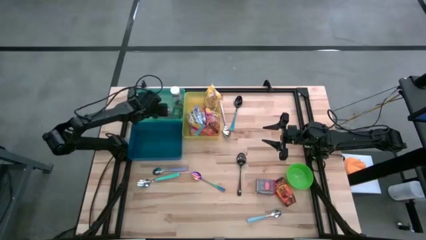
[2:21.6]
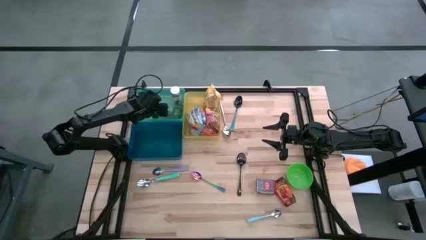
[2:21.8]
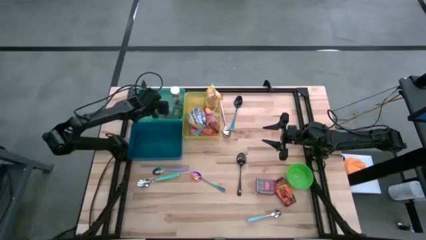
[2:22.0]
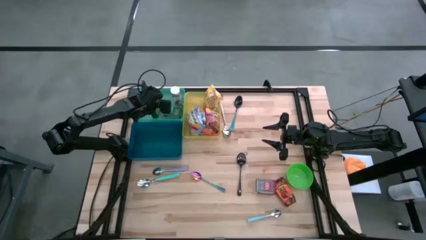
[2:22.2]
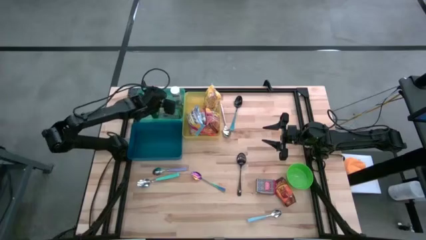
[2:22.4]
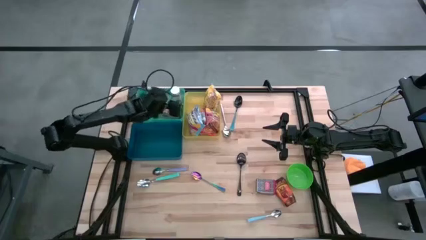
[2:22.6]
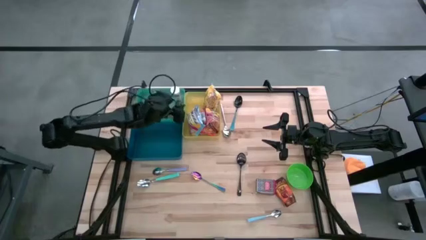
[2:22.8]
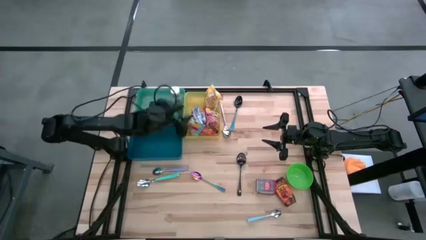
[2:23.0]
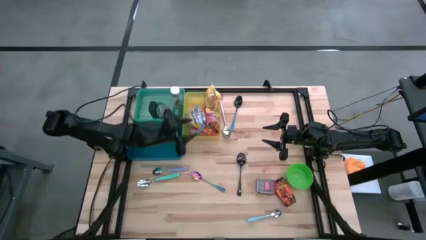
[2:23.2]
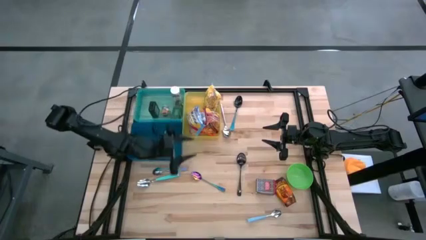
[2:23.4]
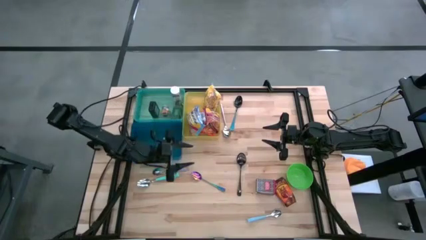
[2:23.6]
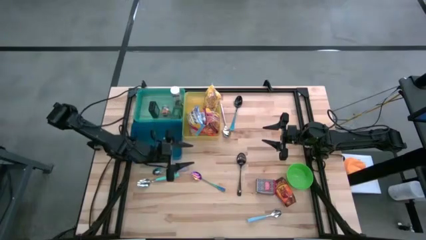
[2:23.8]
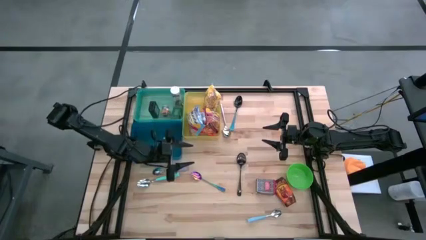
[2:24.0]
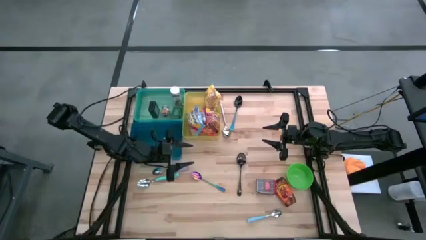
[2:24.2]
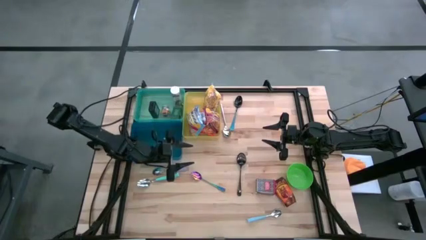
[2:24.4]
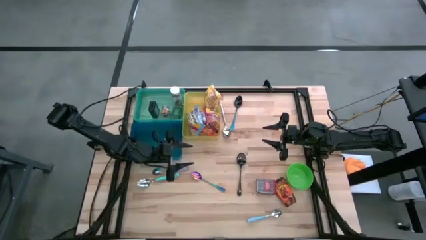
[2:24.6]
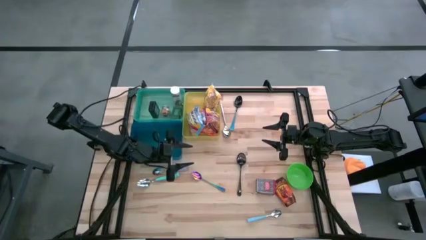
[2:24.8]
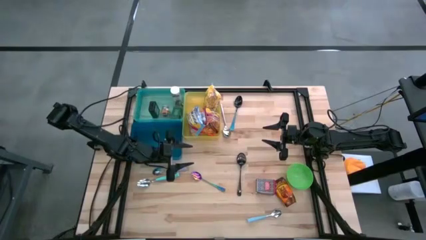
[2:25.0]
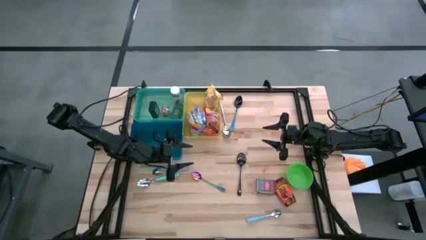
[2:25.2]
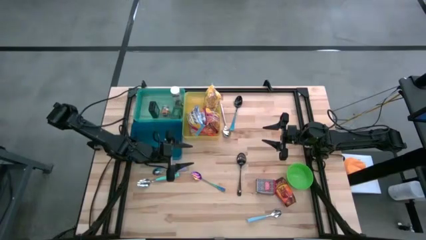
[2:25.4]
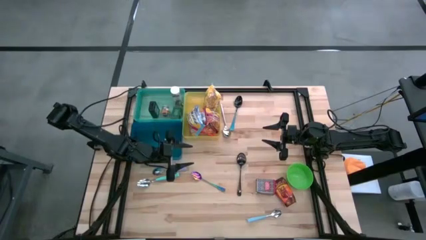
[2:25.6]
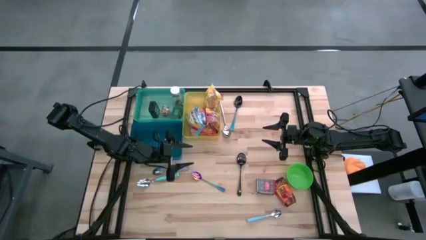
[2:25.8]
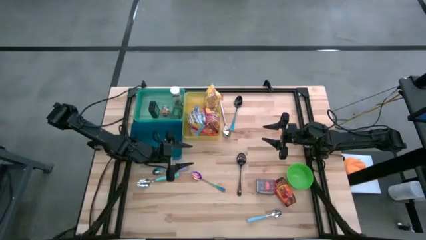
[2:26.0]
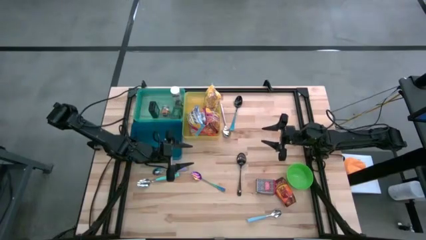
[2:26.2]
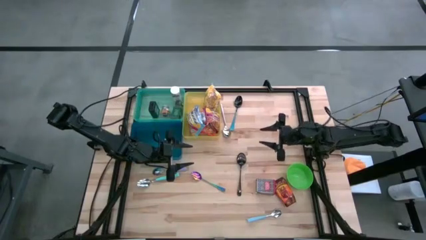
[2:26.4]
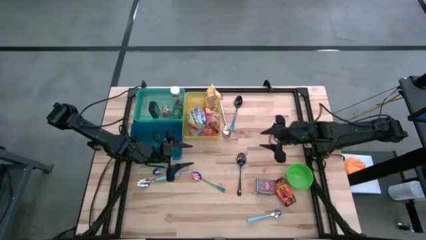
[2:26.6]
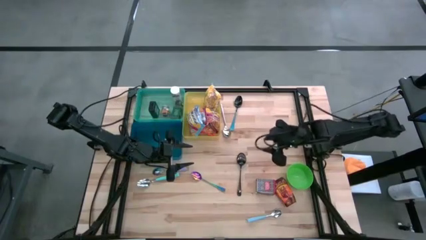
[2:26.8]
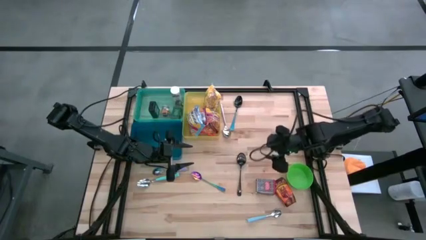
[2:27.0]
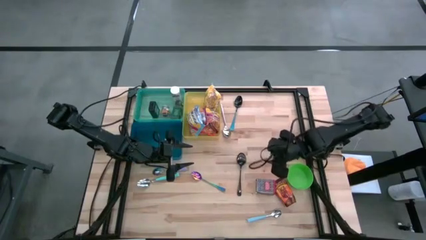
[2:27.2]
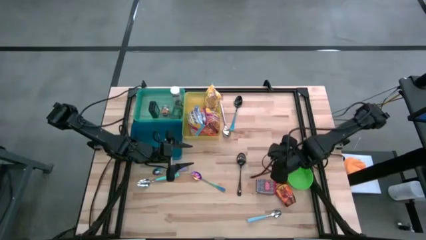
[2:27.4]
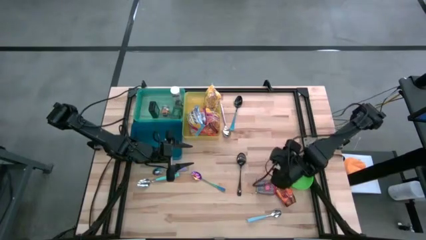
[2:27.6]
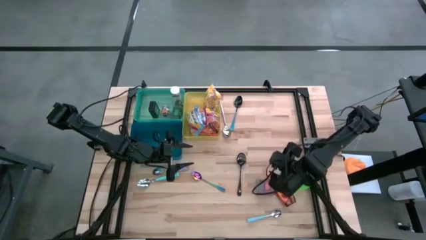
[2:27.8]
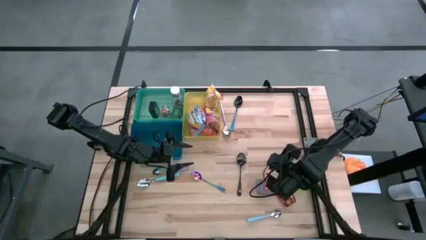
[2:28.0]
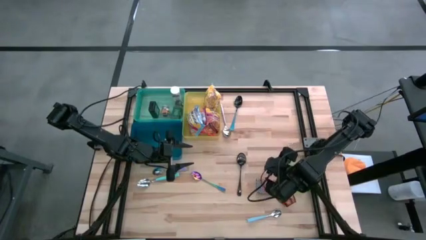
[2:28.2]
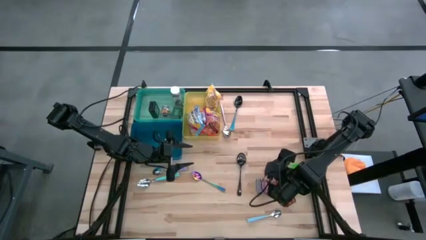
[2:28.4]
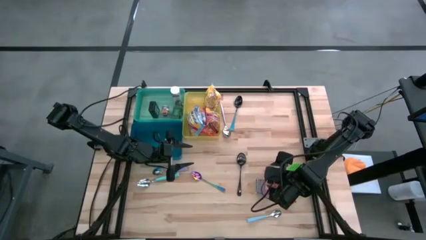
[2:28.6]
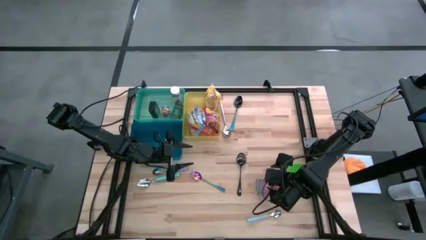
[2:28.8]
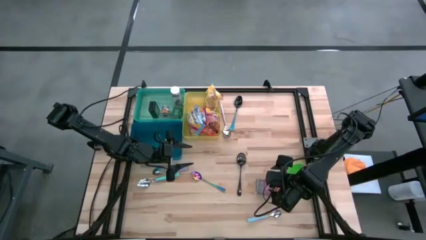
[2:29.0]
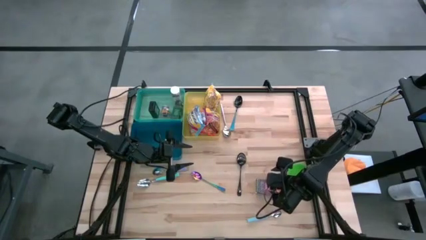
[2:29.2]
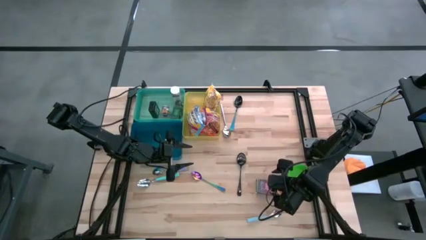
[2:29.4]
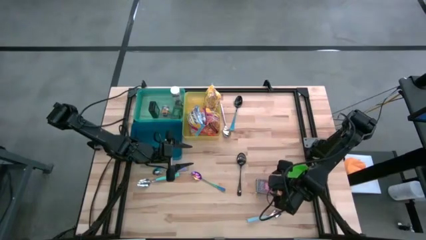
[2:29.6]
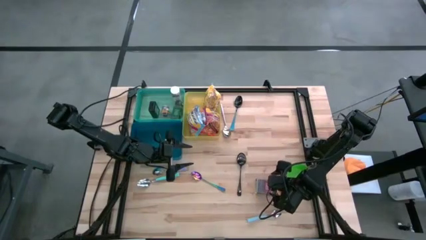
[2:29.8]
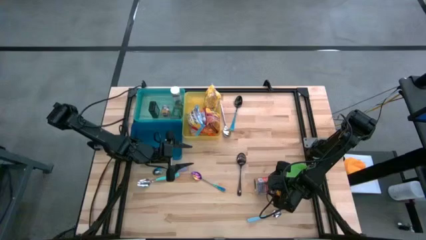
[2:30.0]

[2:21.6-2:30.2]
Put the red spice can into the green bin

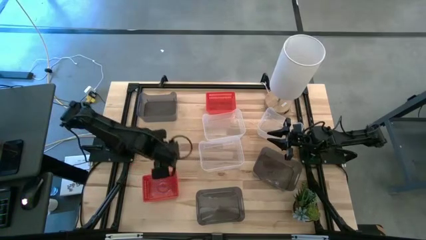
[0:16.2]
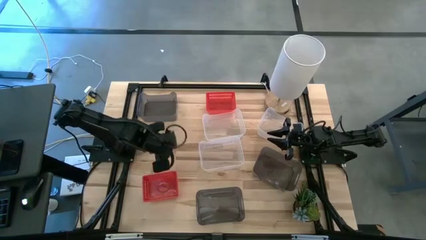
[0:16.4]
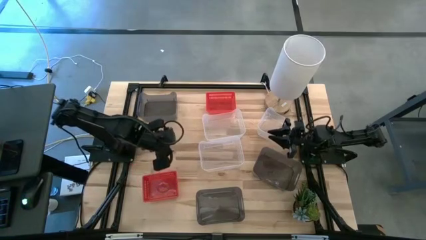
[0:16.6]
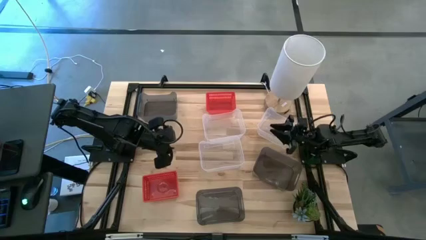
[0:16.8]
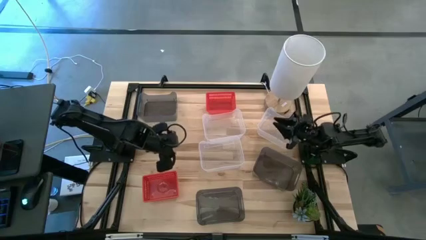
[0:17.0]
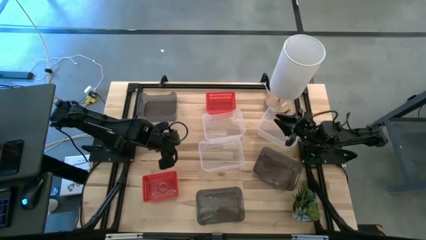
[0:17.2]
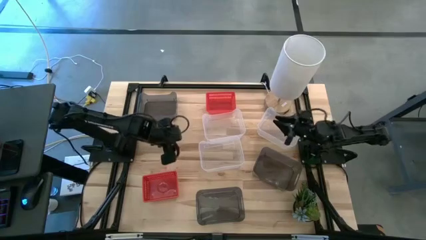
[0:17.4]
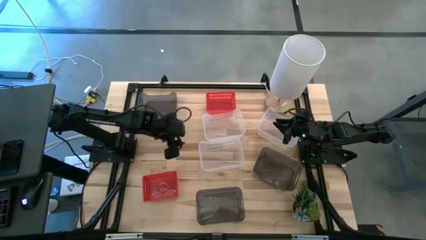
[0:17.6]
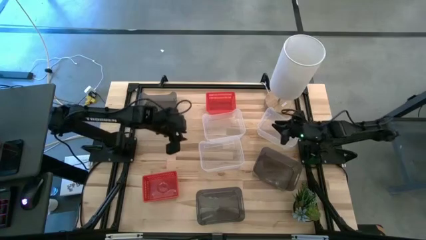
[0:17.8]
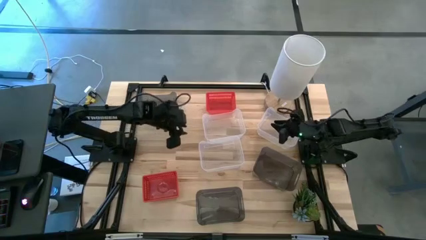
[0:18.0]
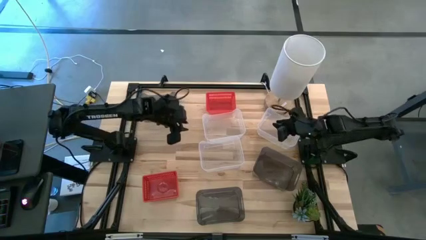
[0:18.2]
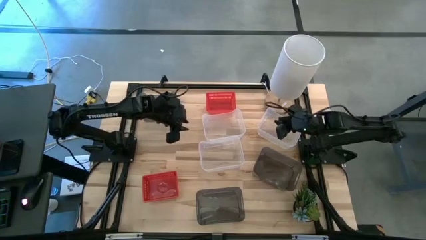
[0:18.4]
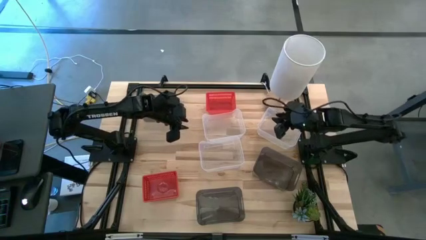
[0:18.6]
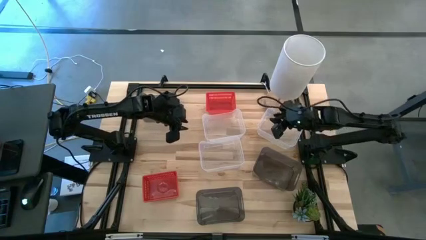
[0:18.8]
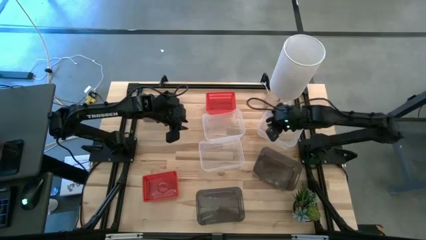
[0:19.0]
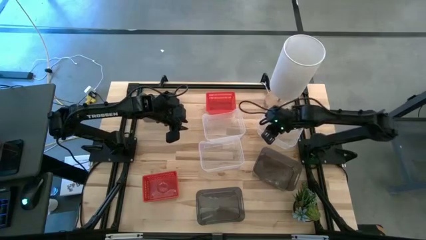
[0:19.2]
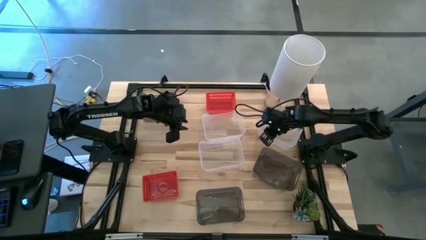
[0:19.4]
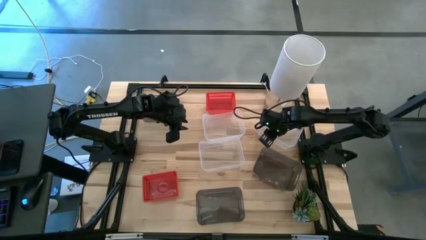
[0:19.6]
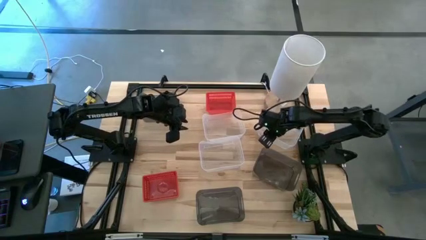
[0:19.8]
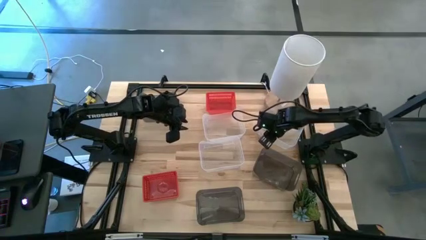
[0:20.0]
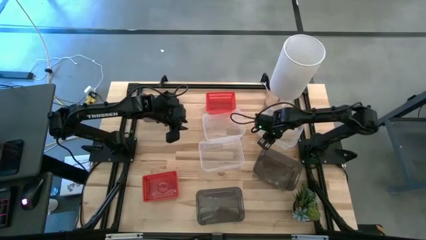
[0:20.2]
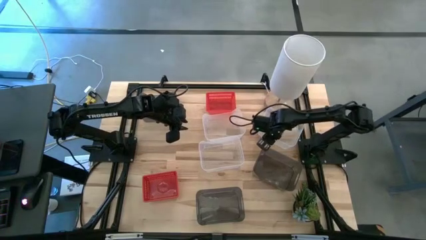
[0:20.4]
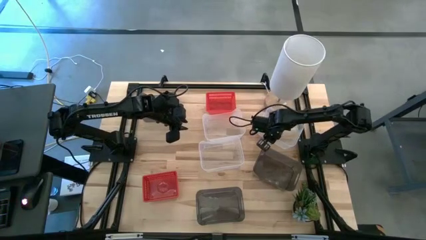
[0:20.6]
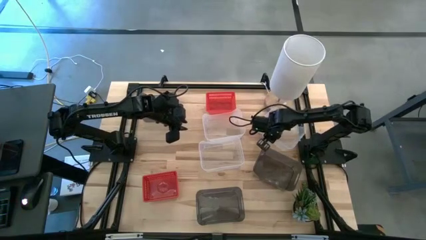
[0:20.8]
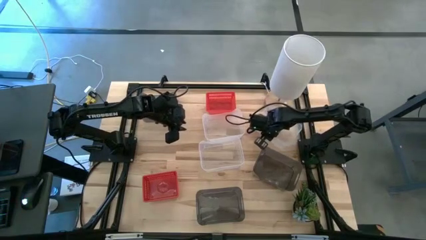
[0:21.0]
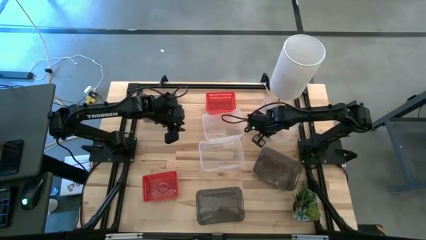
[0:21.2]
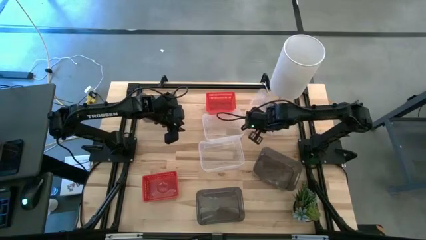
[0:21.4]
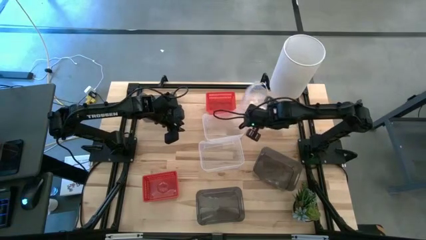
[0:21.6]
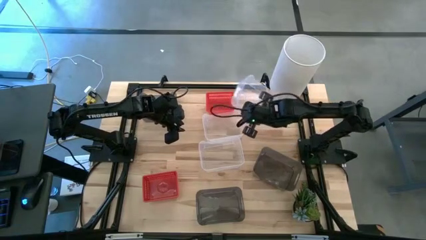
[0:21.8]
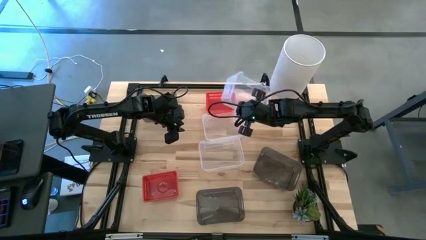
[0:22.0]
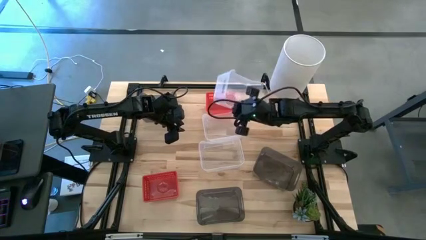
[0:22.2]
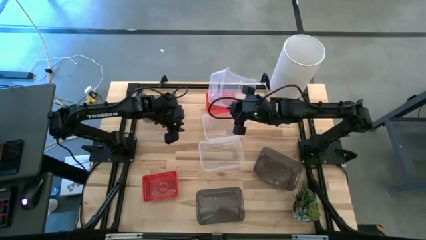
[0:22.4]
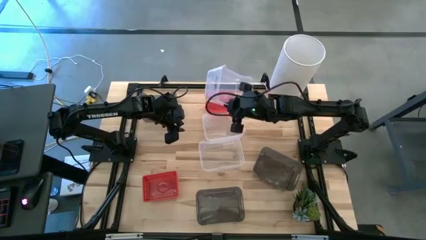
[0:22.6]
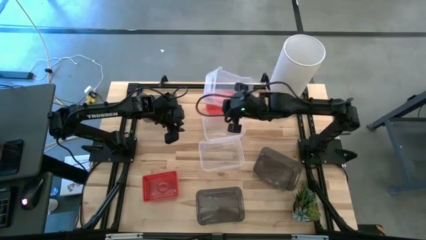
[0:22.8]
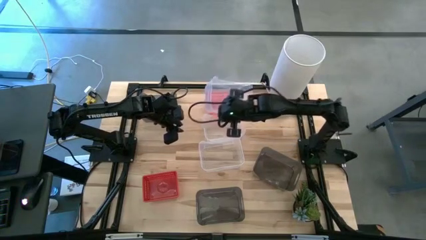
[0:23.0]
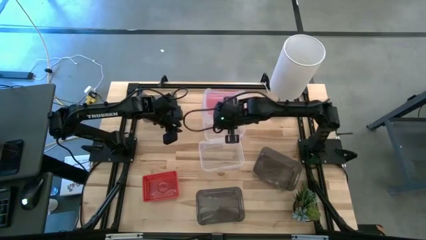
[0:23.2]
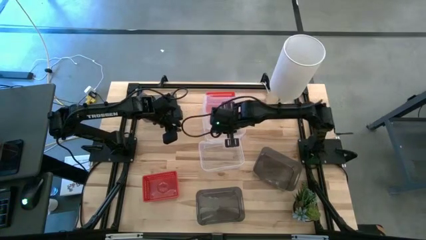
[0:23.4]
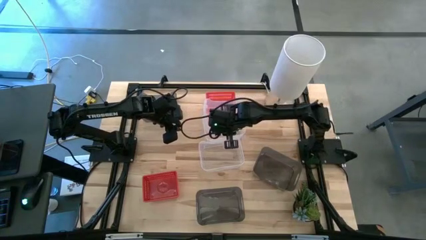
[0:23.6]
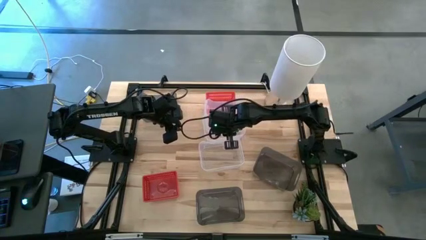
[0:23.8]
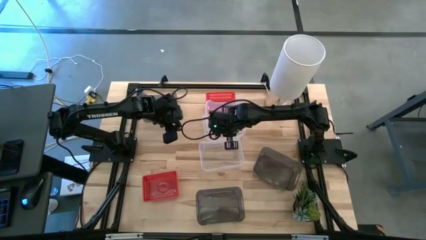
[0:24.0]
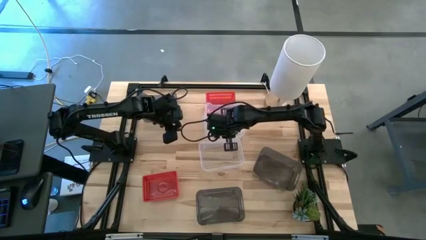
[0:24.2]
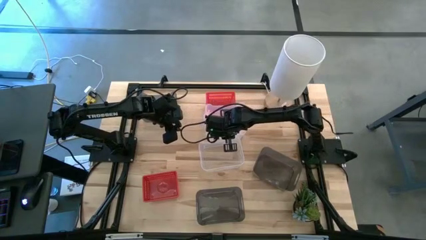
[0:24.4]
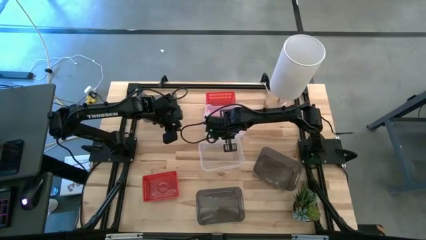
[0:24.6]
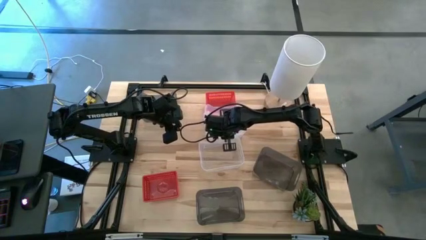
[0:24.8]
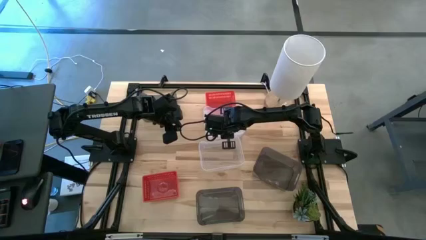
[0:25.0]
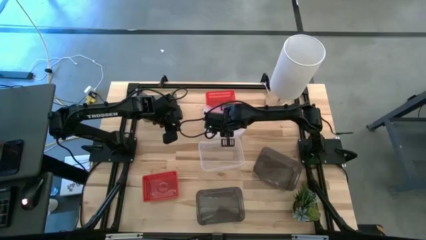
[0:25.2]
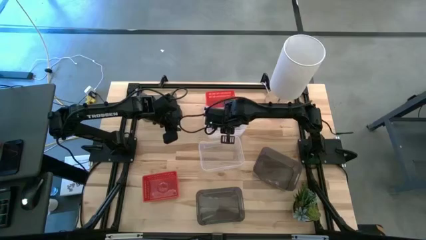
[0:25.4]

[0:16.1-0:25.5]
Stack the top right transparent bin on the top transparent bin
